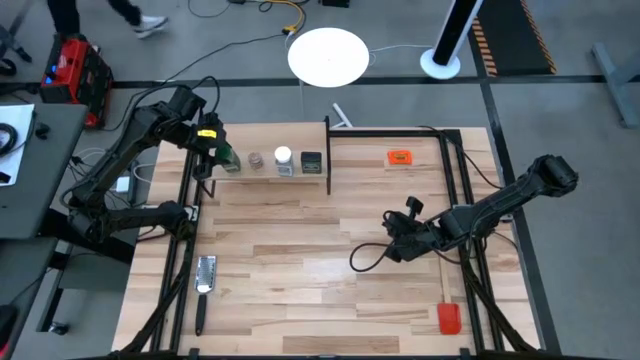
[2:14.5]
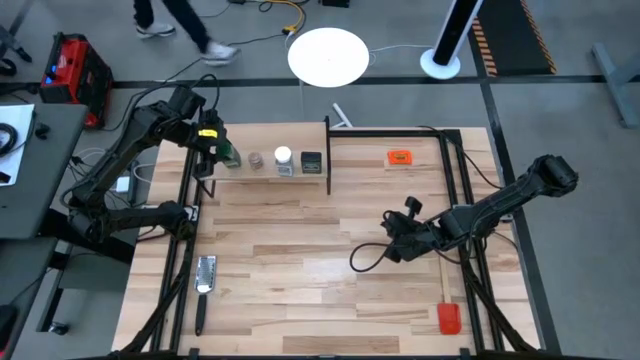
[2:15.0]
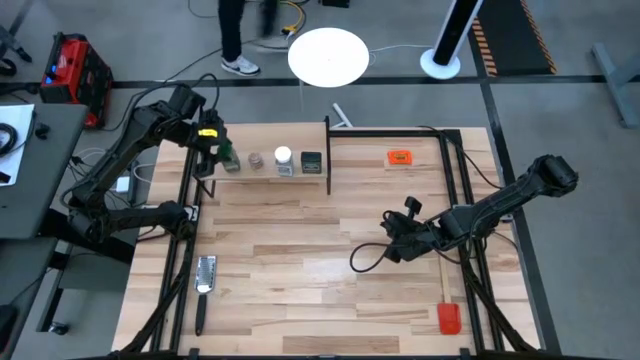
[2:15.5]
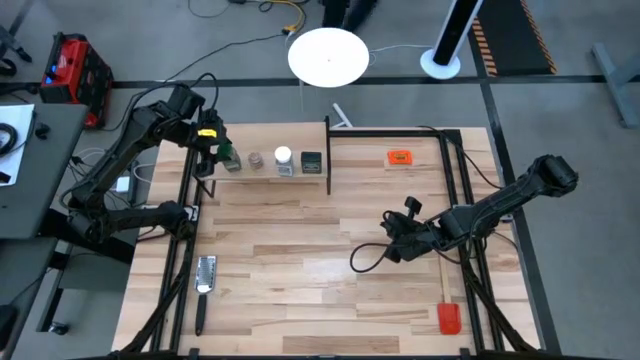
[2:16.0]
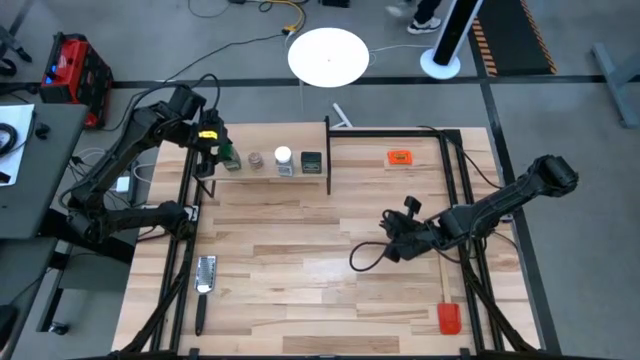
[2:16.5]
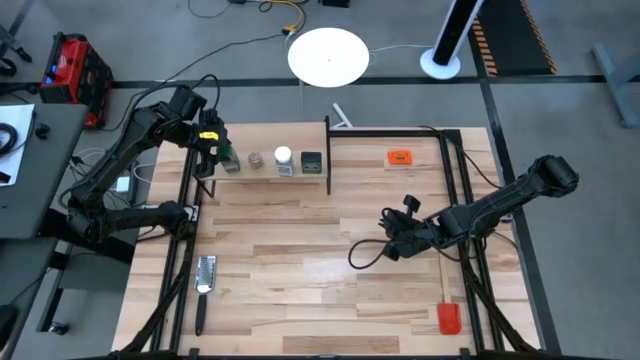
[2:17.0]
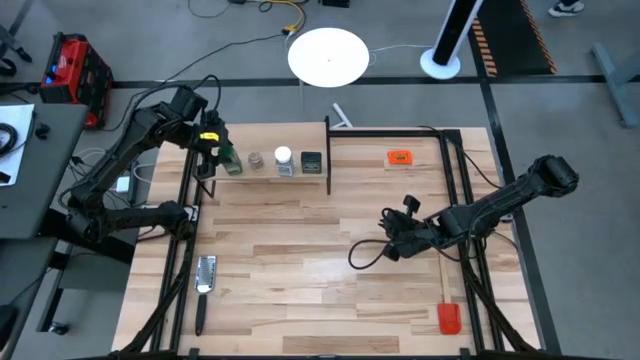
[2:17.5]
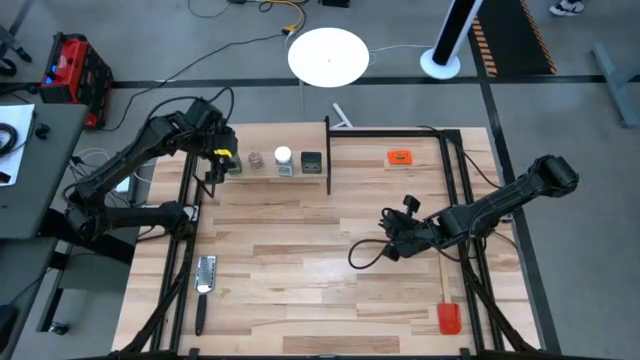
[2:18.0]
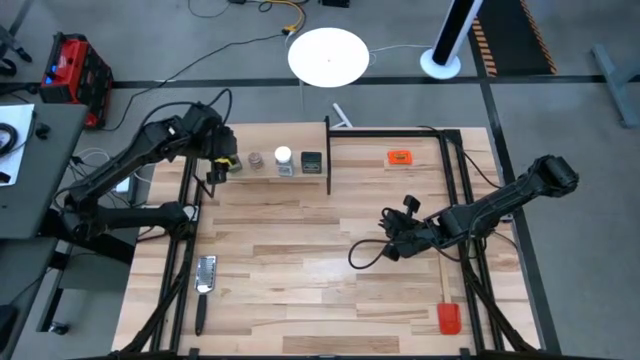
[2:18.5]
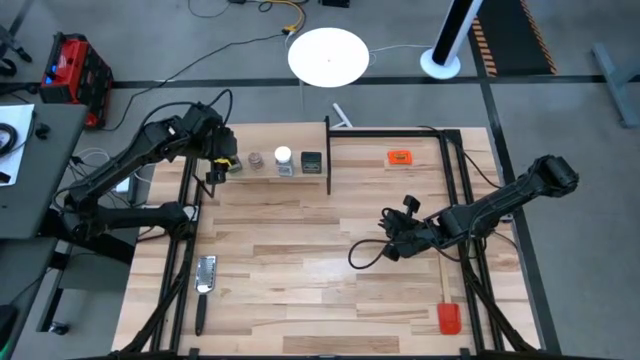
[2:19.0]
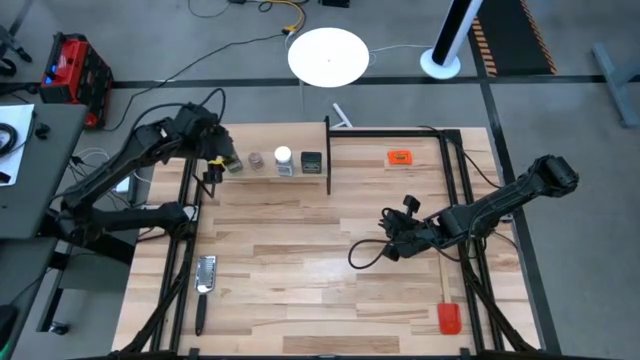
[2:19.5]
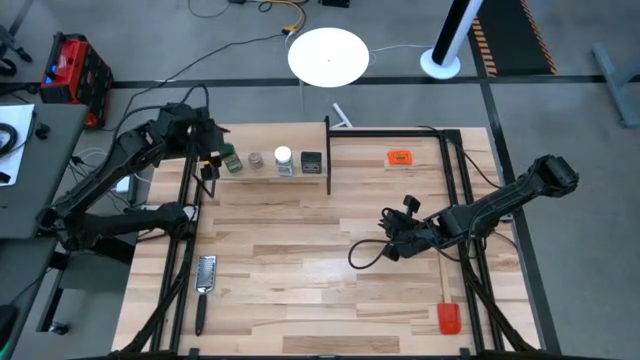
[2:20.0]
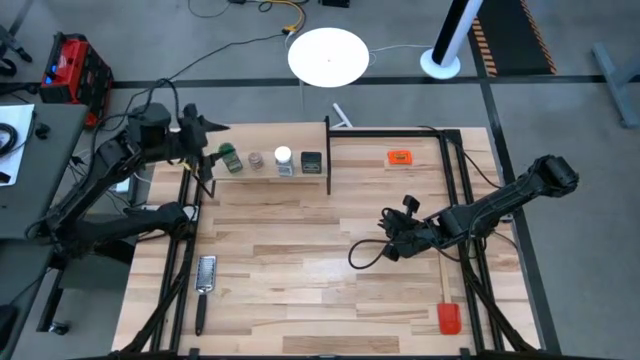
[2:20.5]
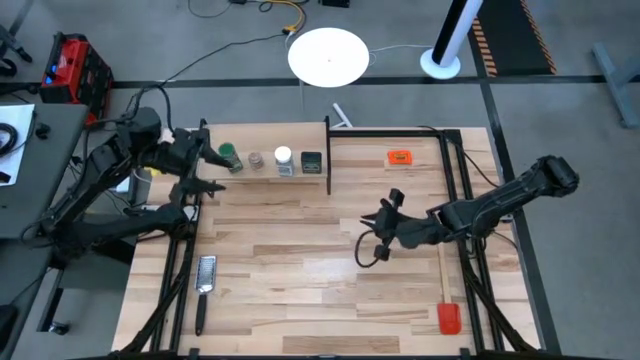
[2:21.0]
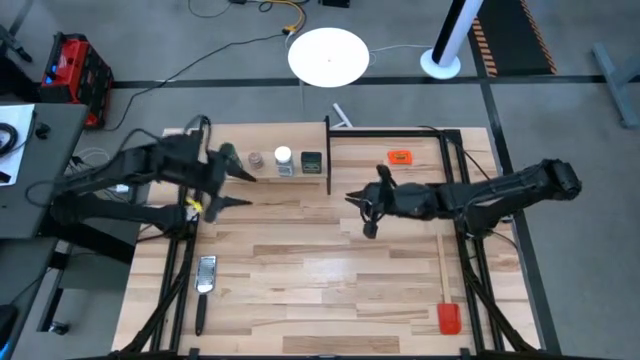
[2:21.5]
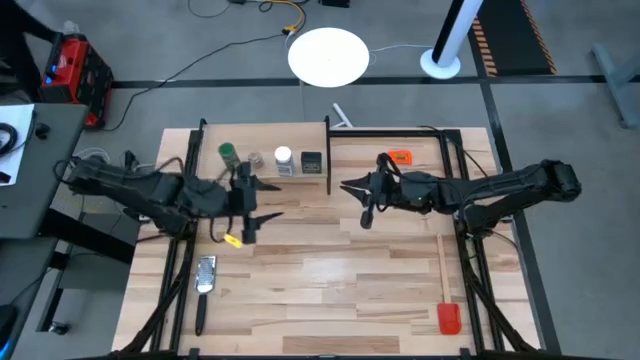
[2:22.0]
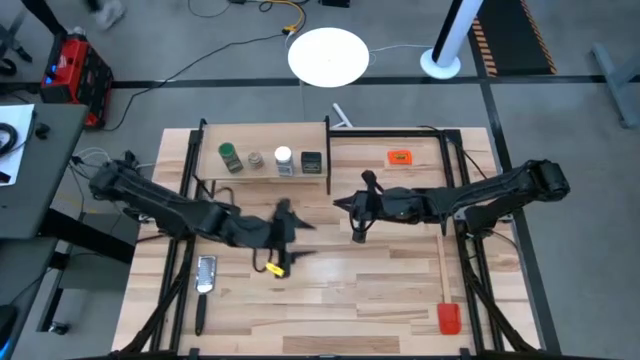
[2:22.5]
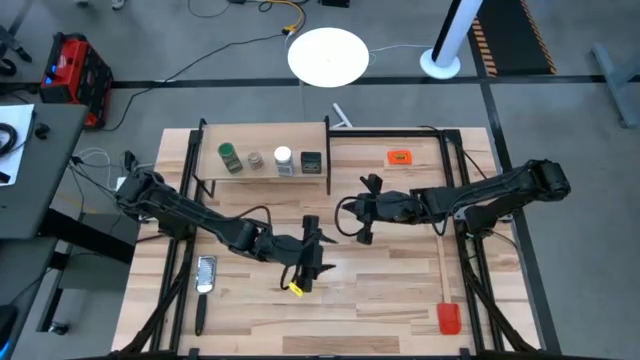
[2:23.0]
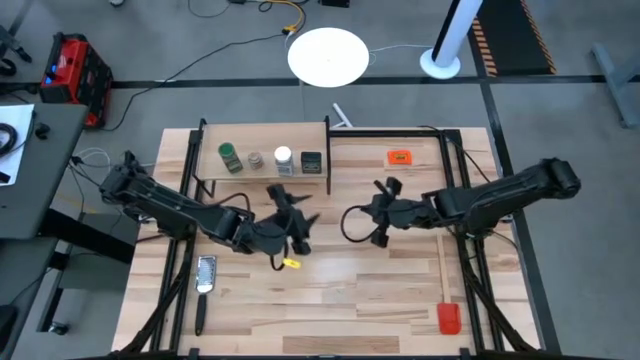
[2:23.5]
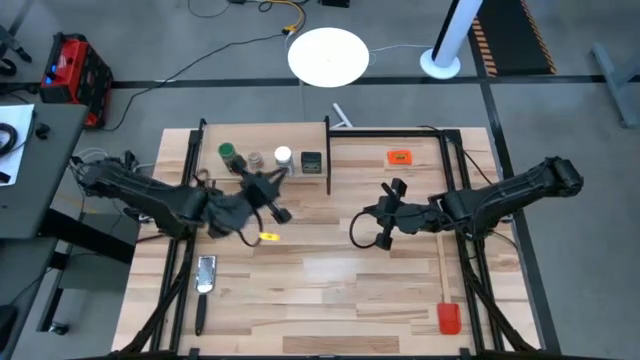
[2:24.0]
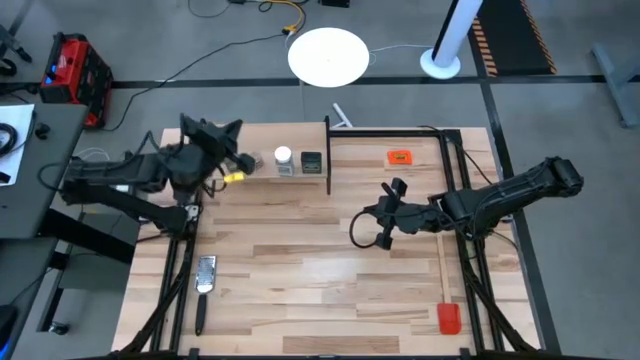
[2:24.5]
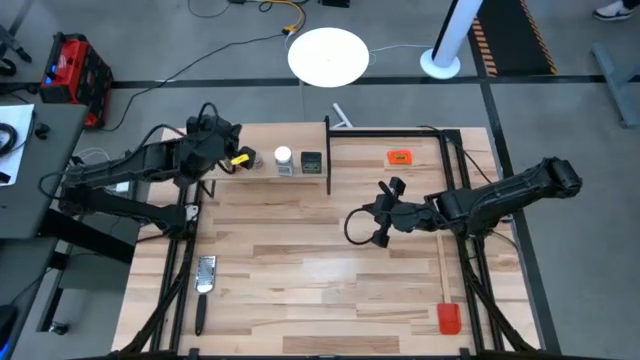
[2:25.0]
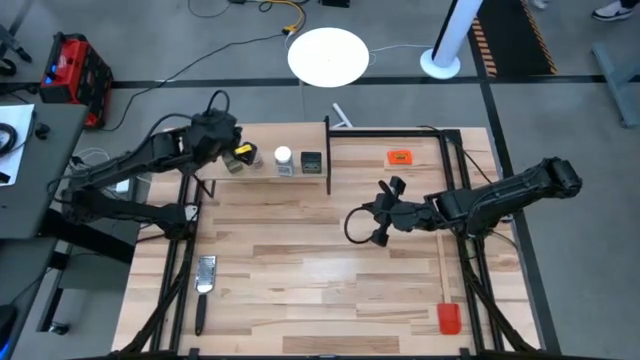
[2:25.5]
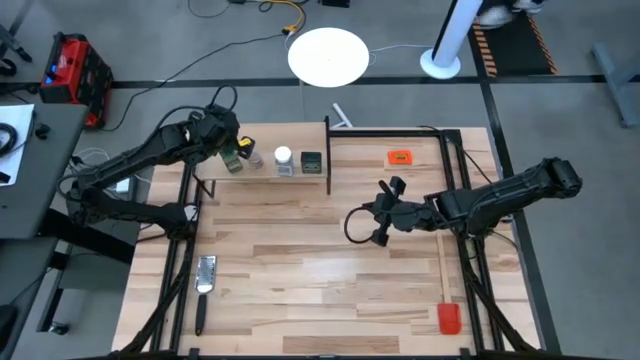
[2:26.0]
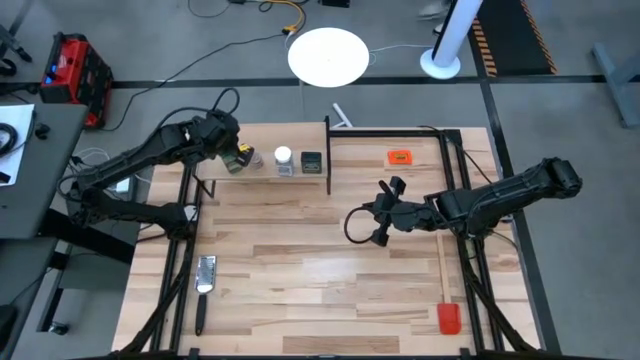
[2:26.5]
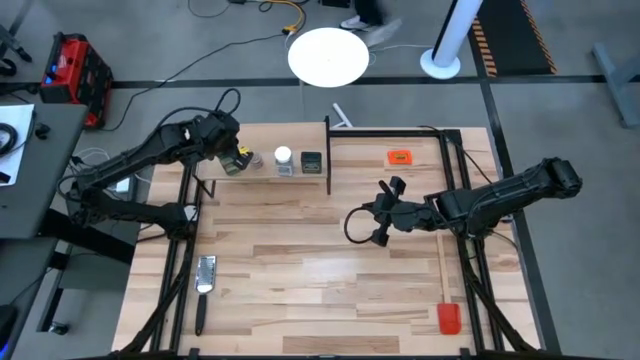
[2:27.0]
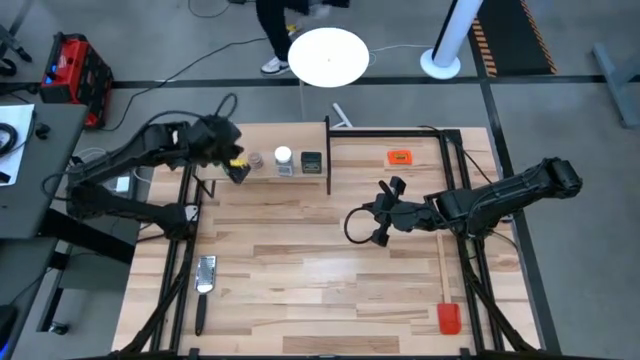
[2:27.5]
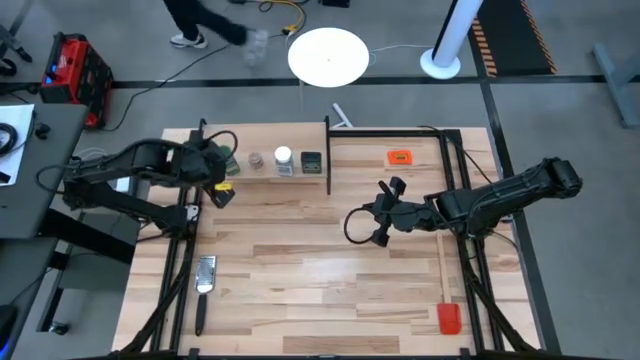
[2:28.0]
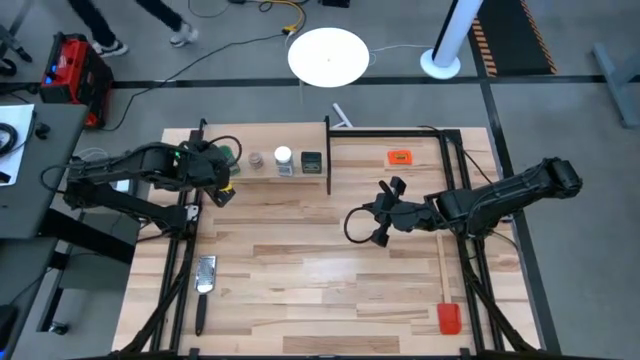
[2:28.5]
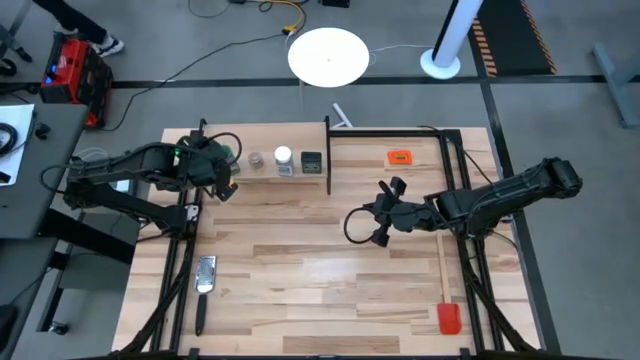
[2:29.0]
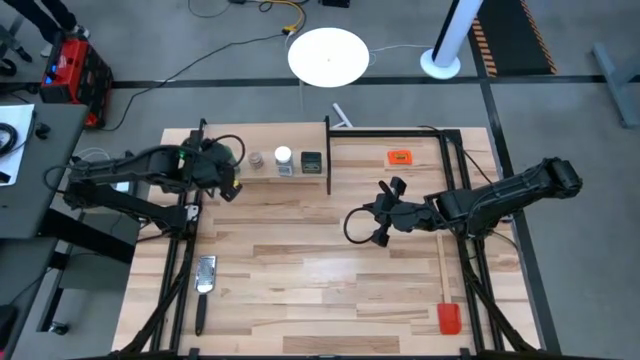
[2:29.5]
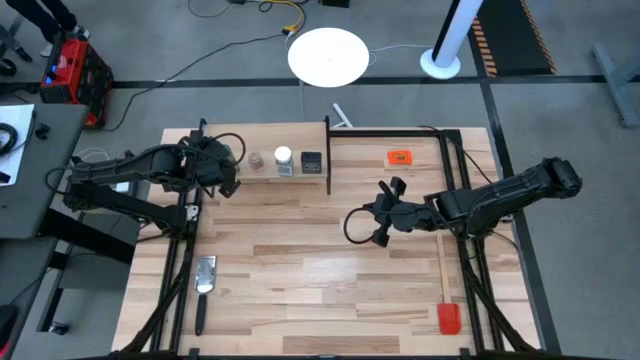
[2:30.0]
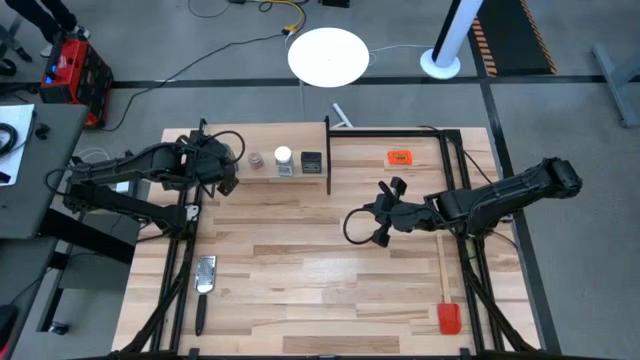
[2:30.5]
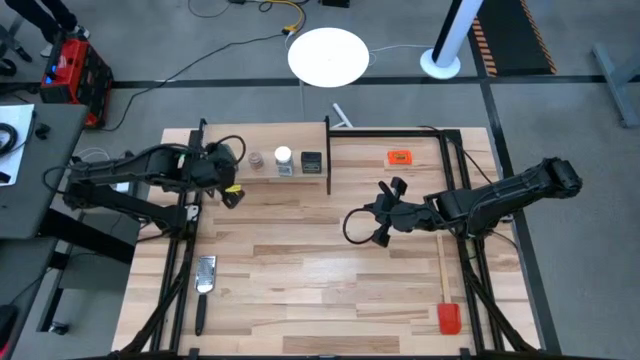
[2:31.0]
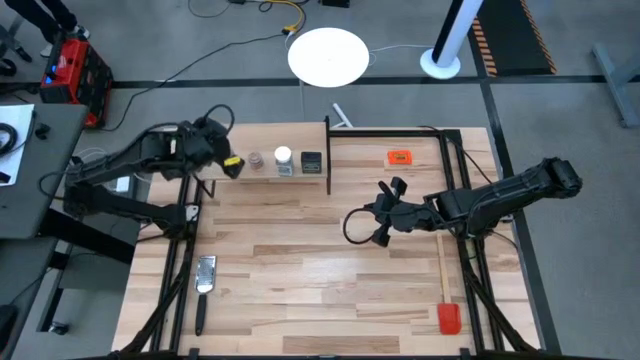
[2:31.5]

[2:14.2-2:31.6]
Task: Shelf spices
Remove the green seasoning bottle from the shelf

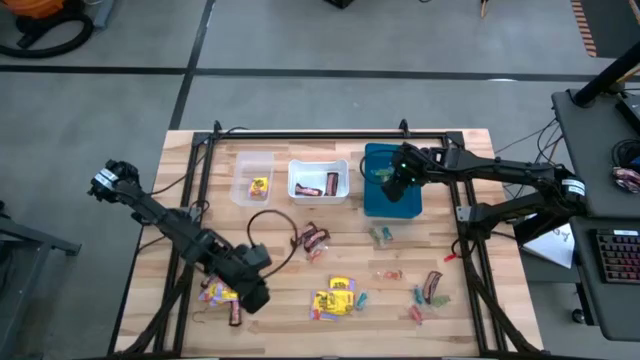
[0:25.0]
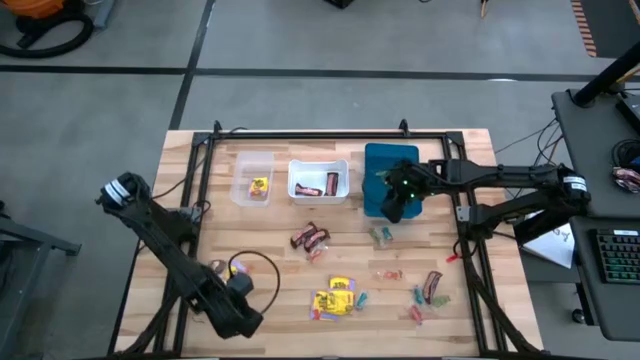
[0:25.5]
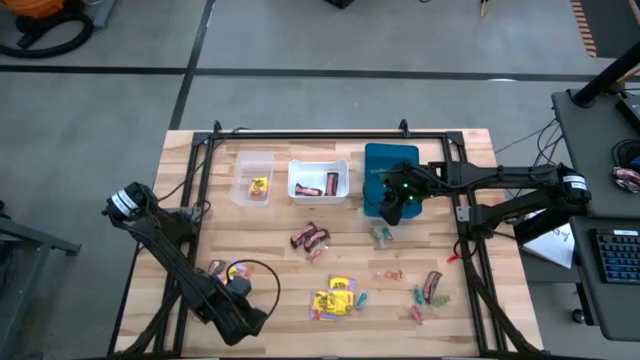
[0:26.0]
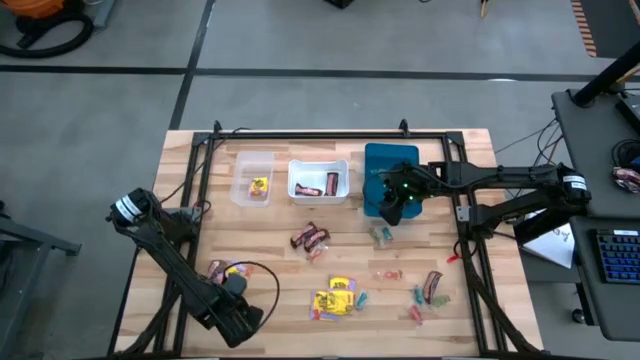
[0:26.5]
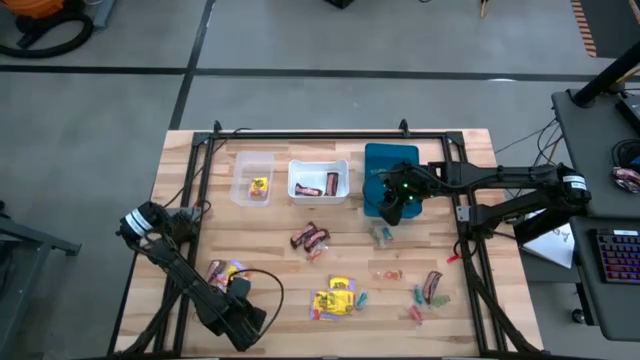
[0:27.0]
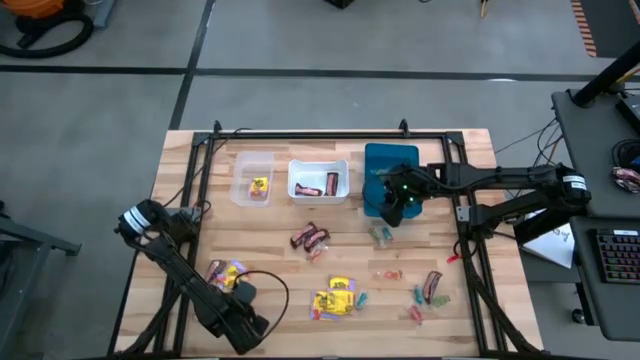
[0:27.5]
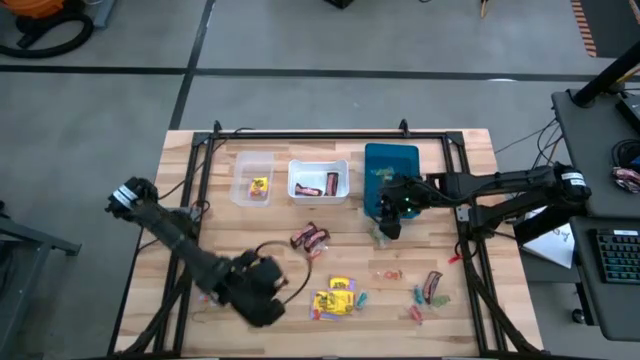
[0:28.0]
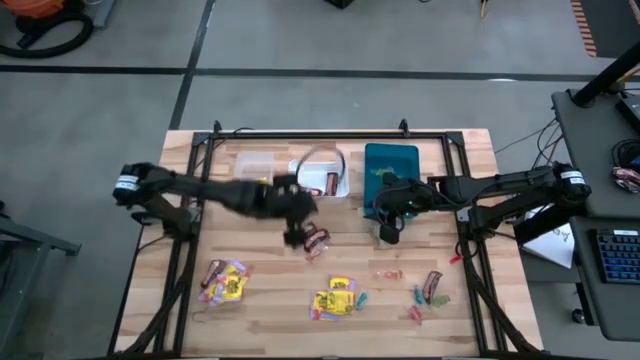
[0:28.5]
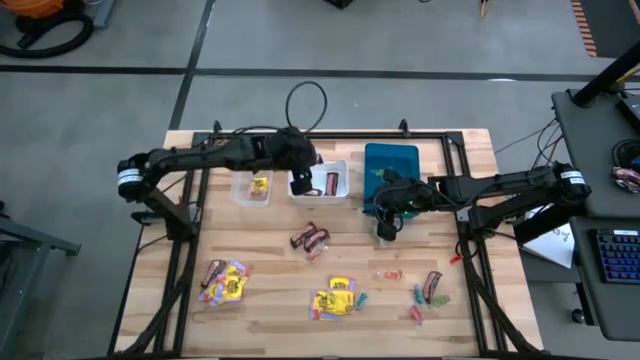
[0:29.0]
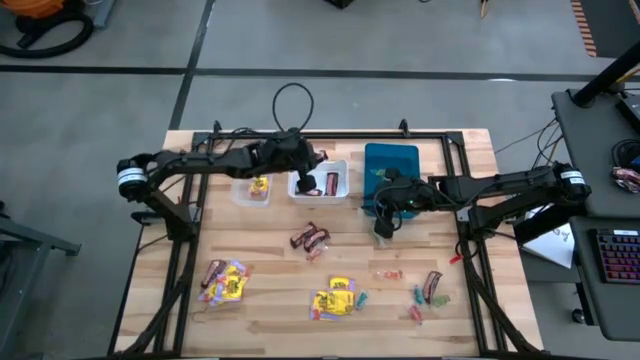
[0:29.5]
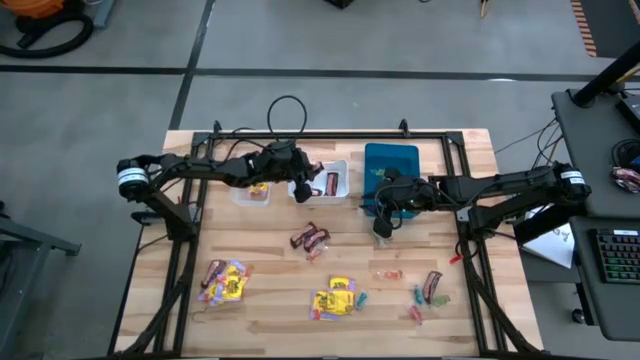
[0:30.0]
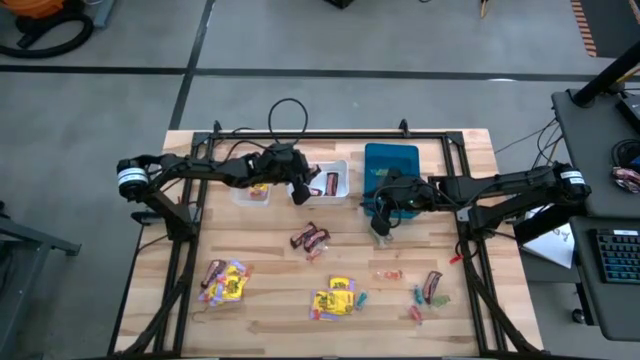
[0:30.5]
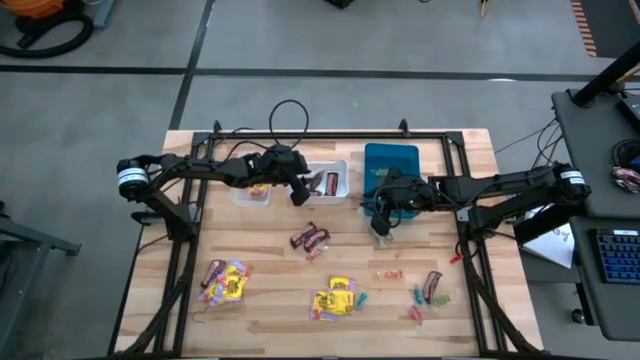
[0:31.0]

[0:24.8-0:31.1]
Task: Sort candy
Put the brown chocolate into the white bin
